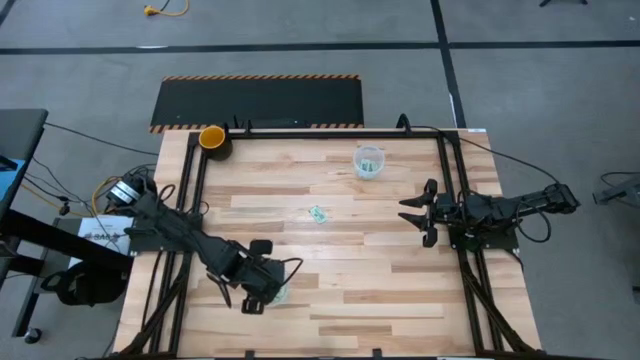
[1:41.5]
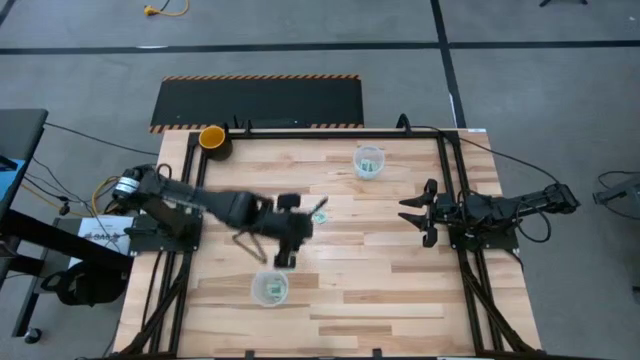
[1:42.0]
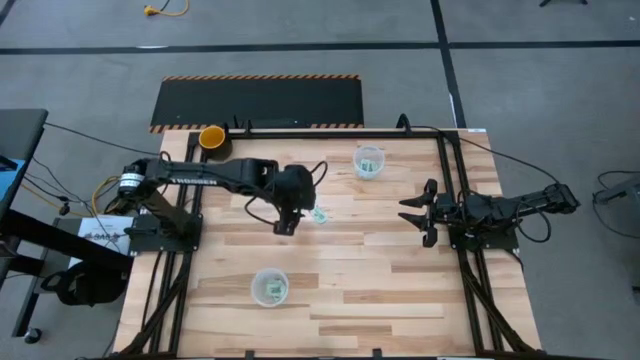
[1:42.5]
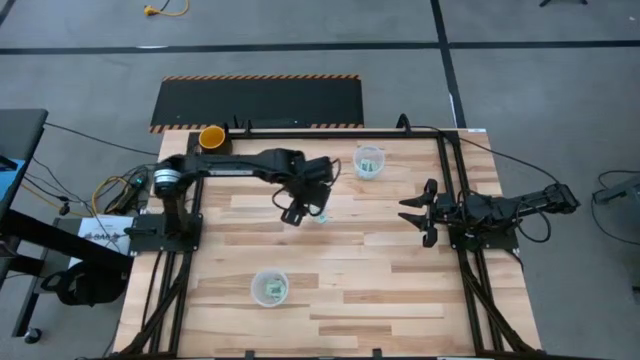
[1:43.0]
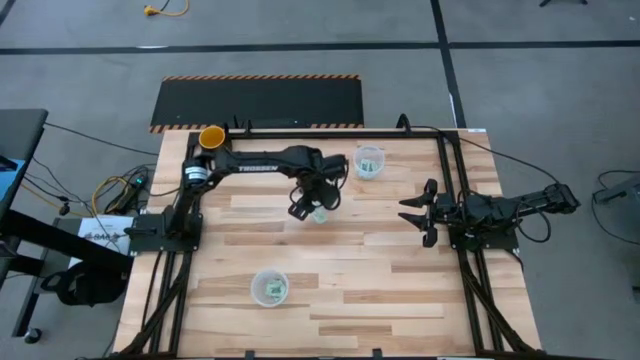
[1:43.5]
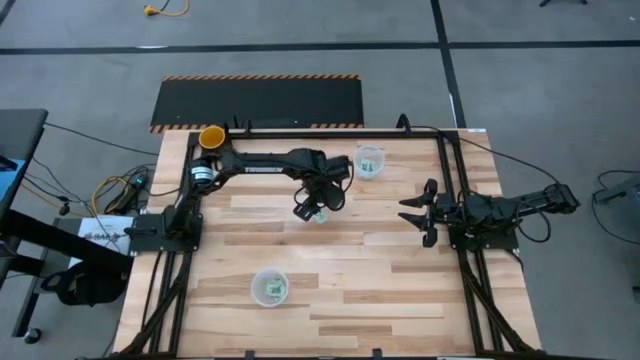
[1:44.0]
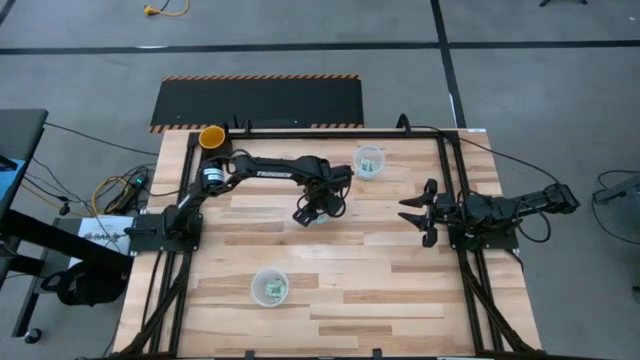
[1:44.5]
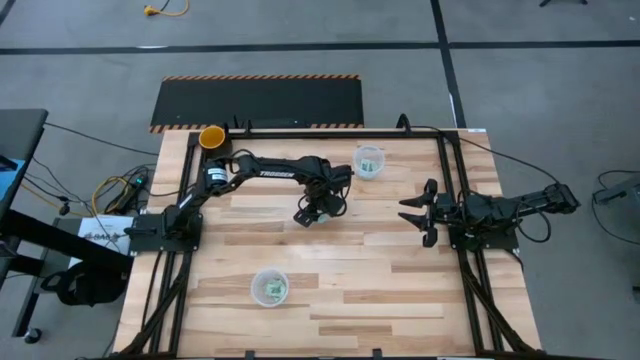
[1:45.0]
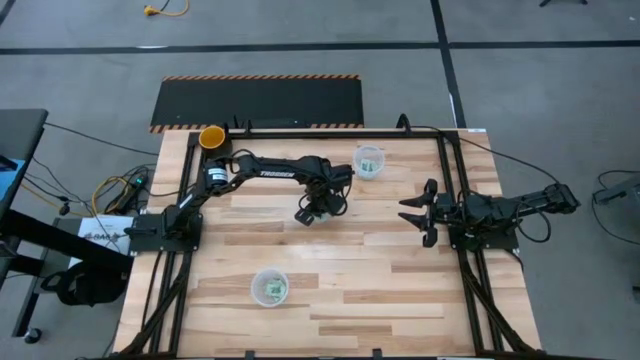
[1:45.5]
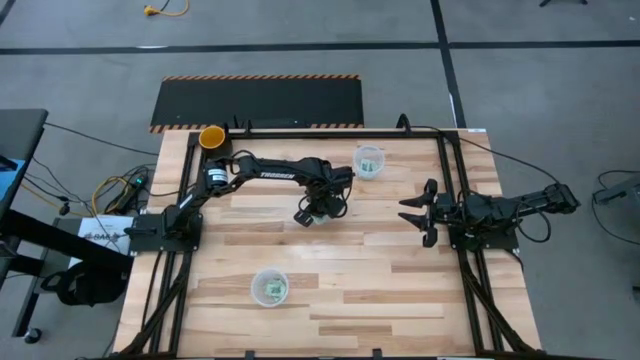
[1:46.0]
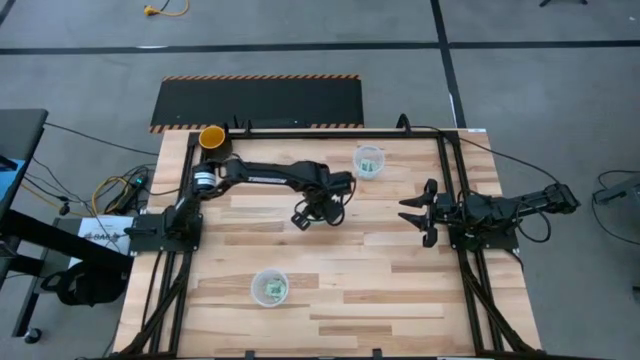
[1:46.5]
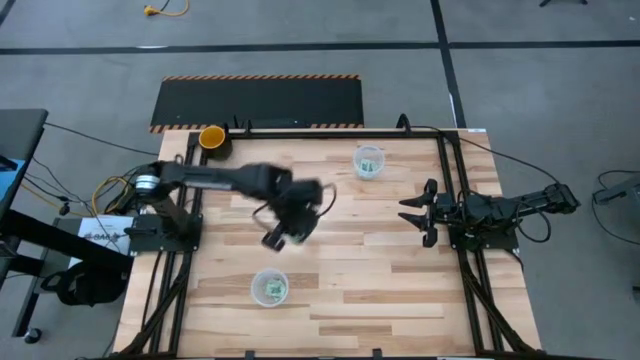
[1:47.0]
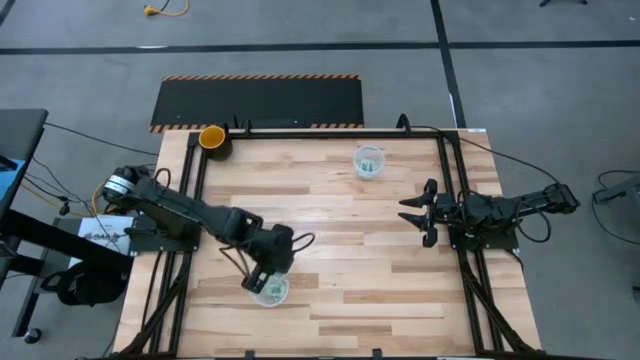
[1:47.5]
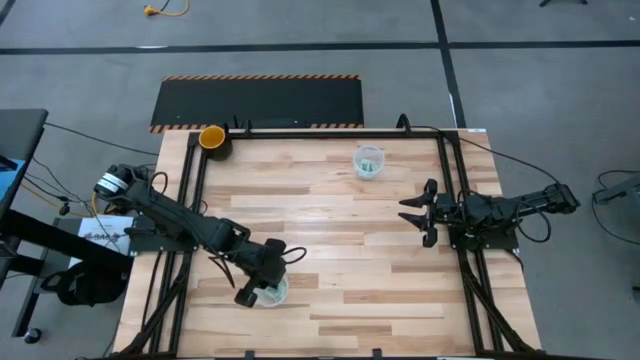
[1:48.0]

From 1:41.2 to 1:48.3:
Task: Pick and place Stevia / Truvia into bins
Put the stevia packet into the bottom container

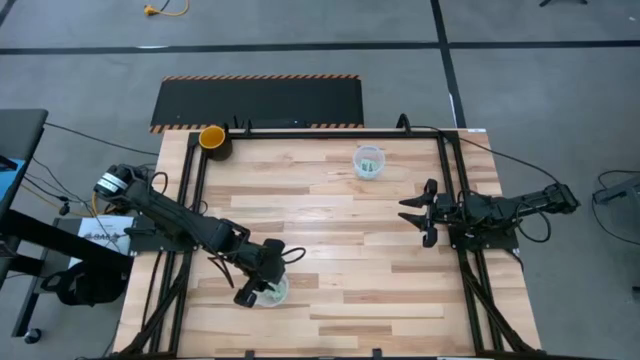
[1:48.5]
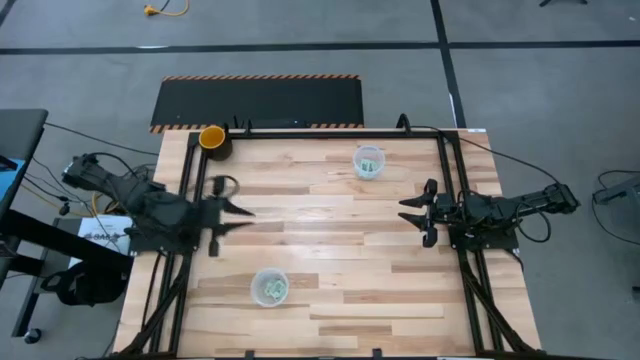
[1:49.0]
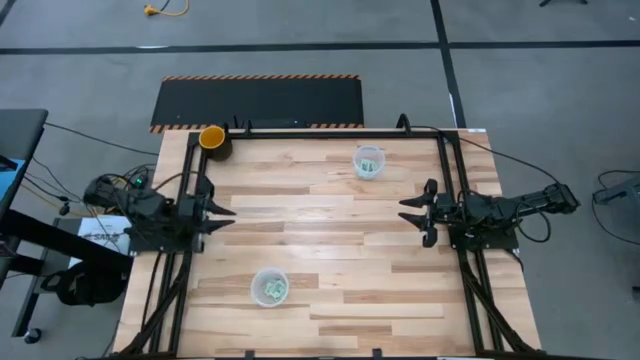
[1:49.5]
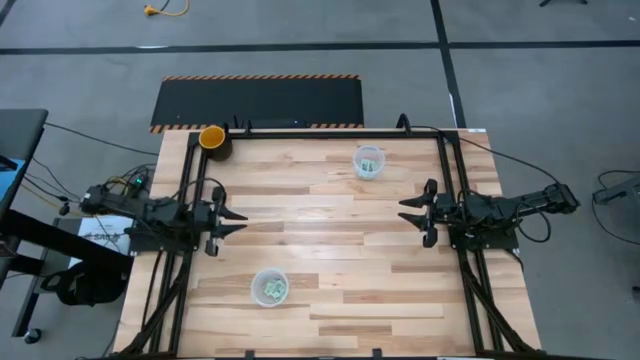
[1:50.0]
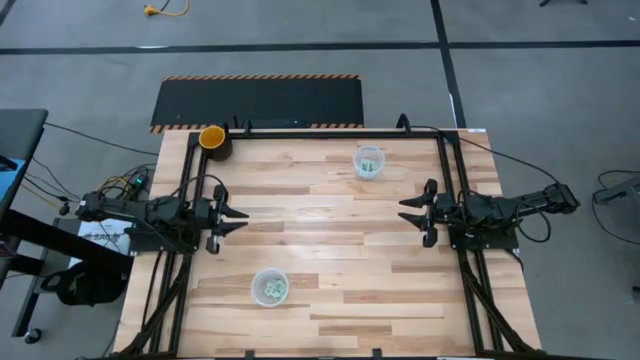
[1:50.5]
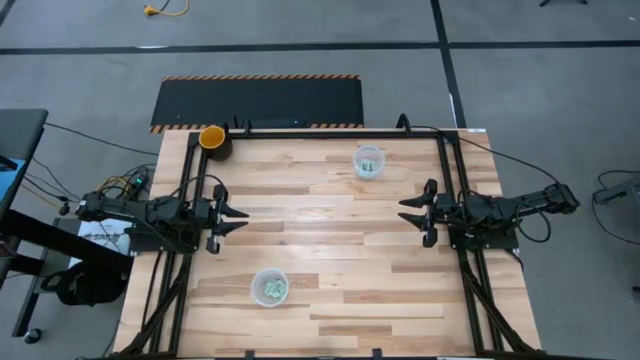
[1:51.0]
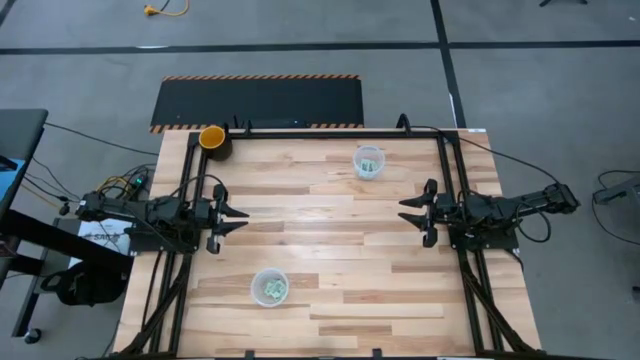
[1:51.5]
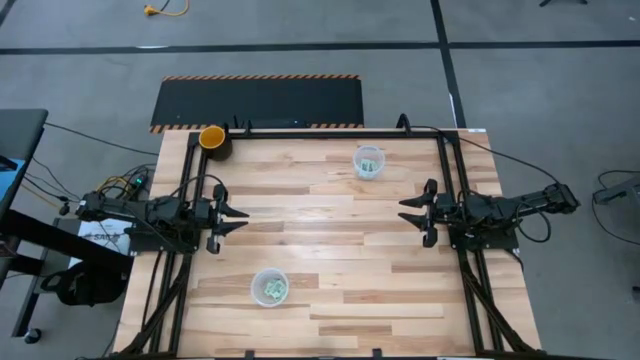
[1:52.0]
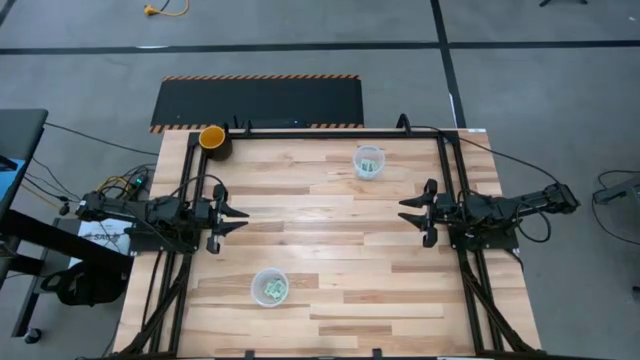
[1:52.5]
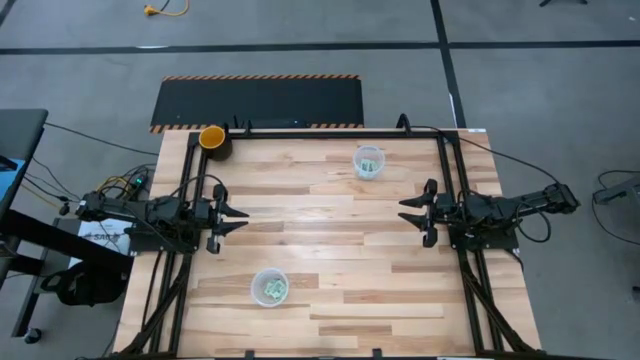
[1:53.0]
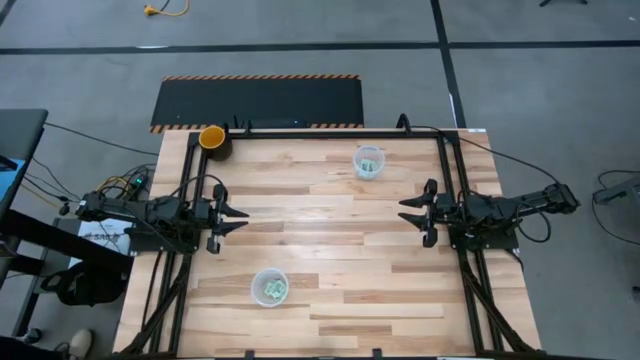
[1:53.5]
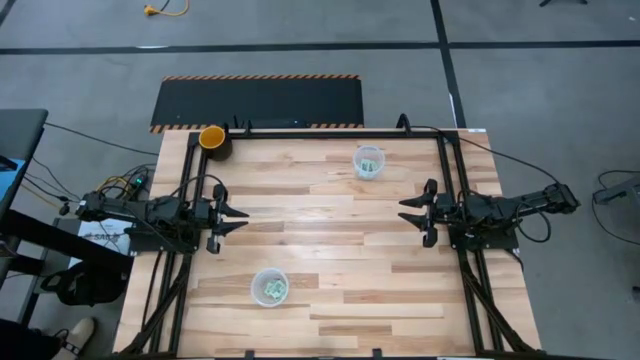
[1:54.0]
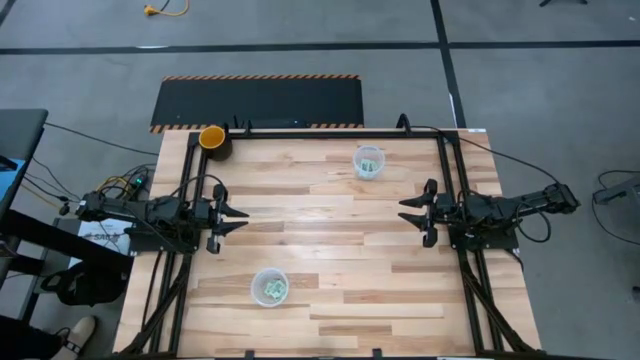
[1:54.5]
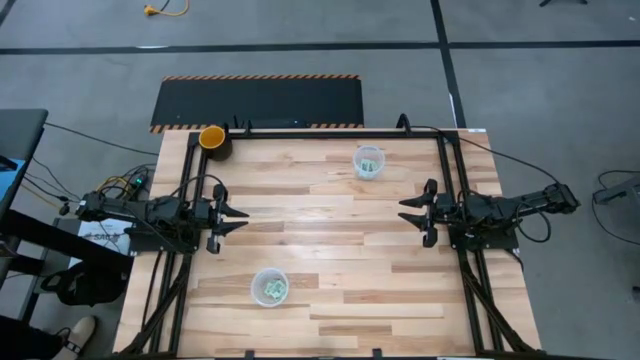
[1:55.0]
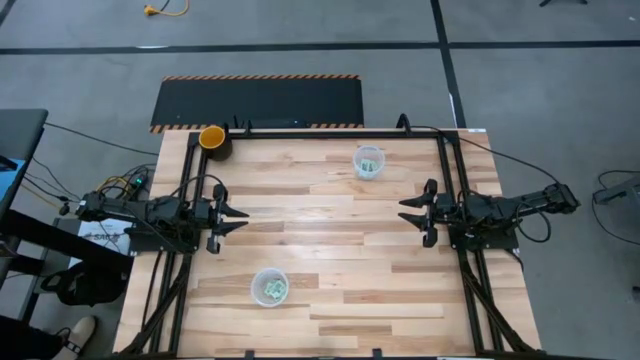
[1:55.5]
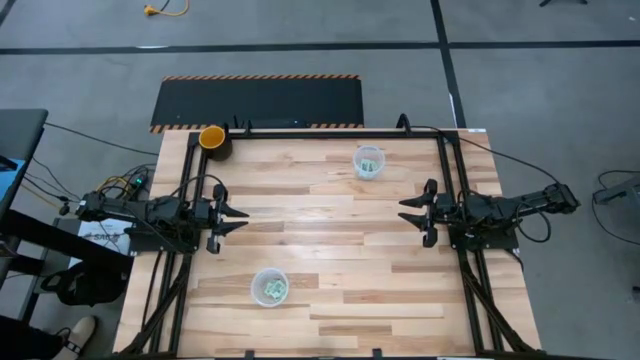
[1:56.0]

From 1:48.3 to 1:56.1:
Return to Home Position

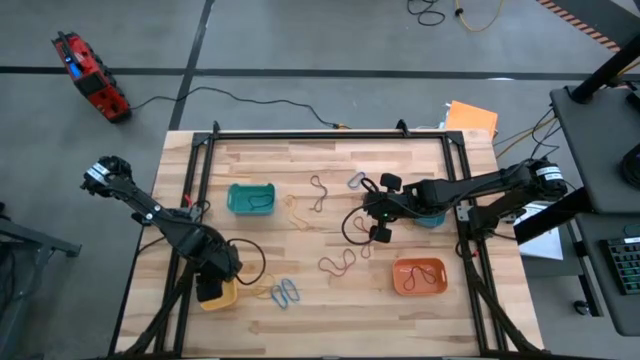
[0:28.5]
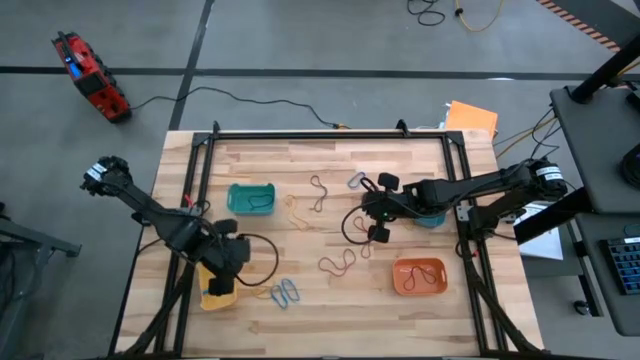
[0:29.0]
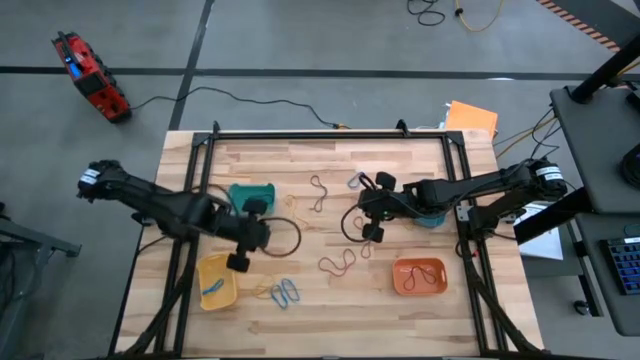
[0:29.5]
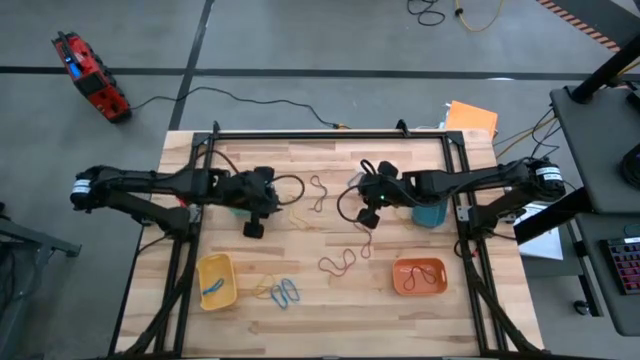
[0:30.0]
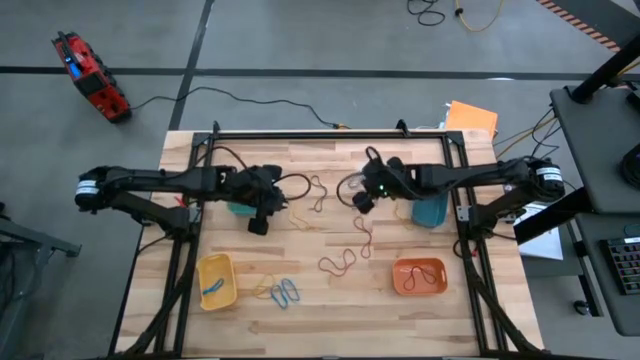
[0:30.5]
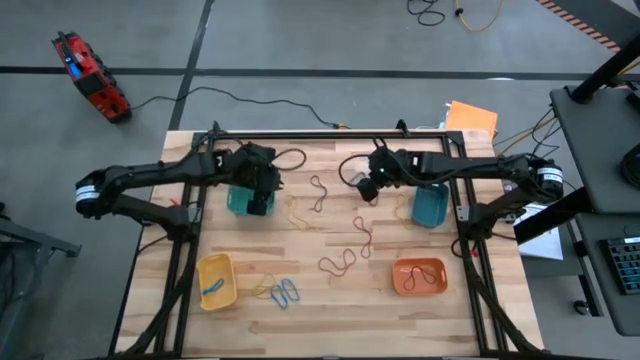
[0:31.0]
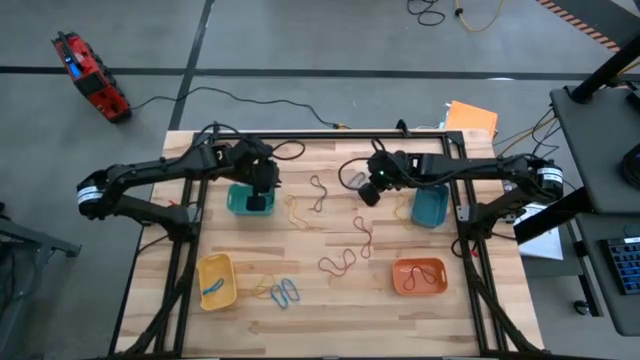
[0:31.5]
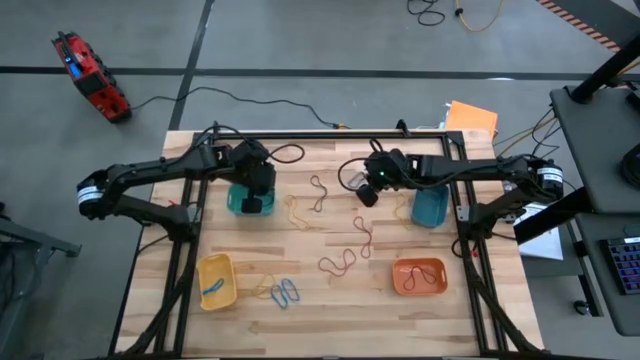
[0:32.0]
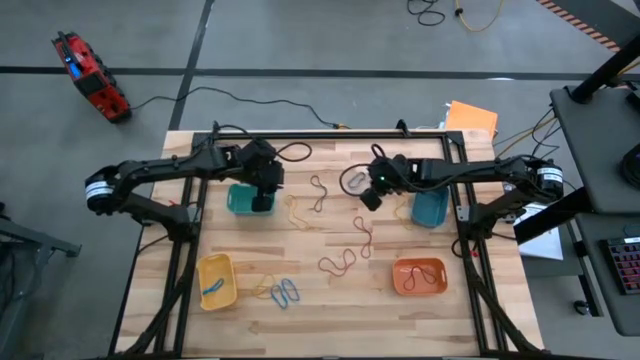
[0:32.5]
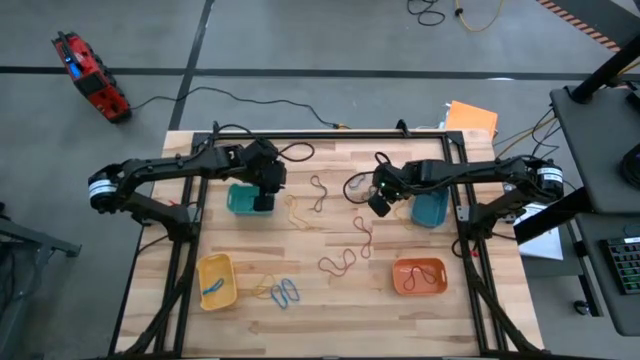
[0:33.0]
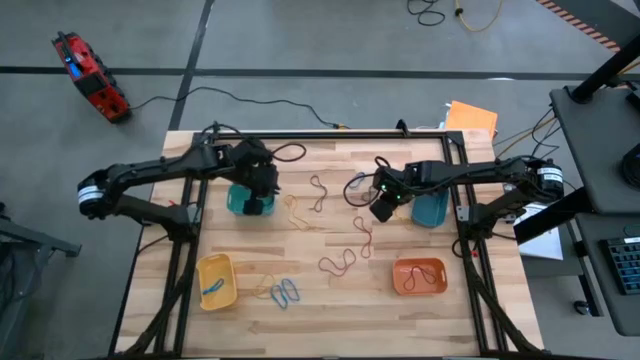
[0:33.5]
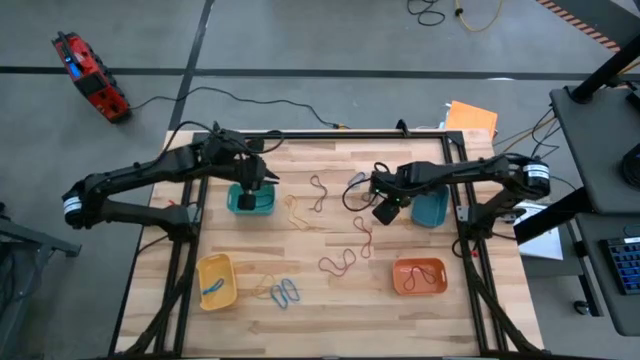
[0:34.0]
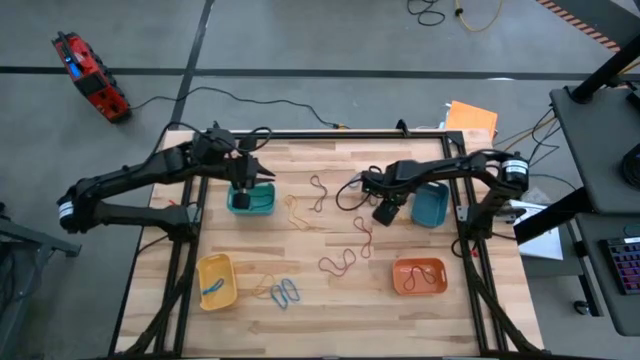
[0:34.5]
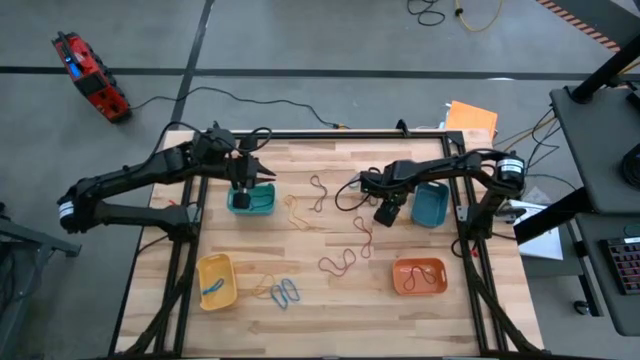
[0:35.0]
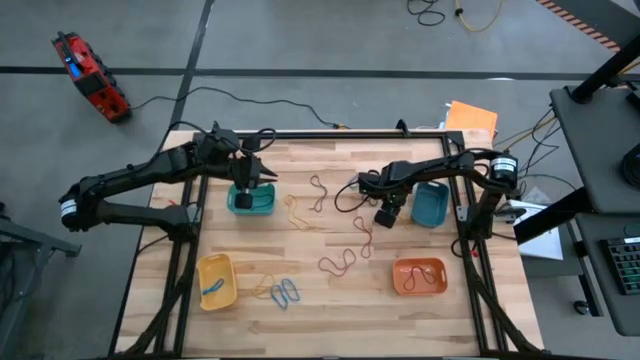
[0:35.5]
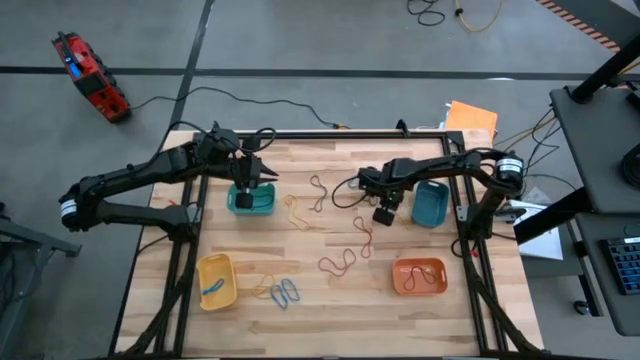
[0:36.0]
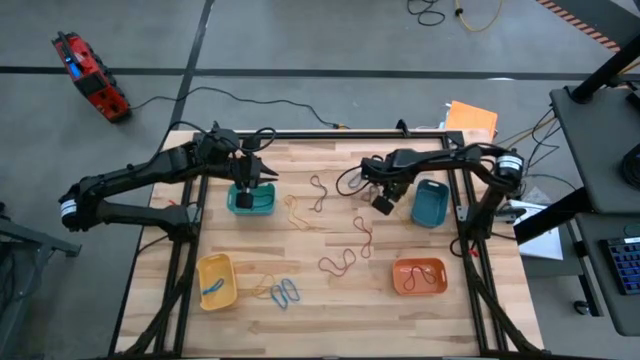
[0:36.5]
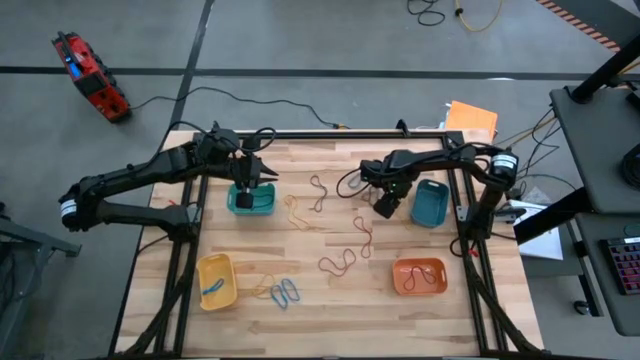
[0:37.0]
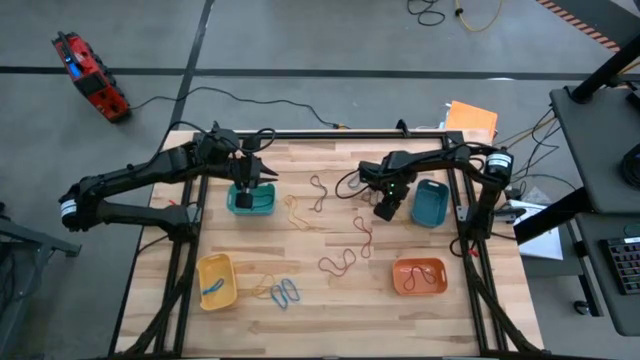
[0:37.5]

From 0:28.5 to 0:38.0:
Task: Sort rubber bands into baskets
Put the yellow rubber band into the blue bin
